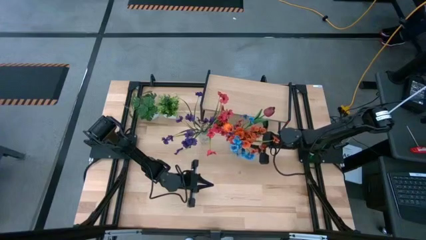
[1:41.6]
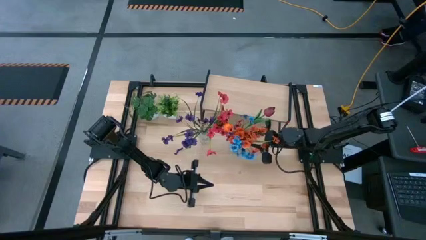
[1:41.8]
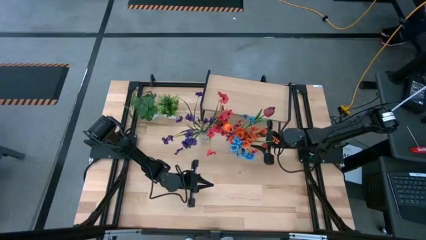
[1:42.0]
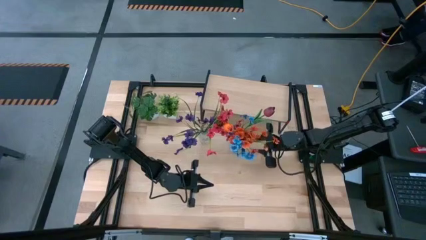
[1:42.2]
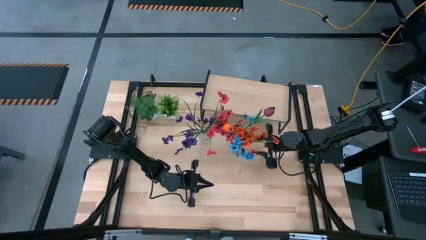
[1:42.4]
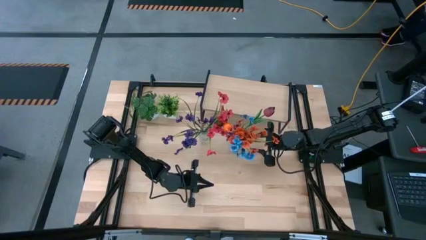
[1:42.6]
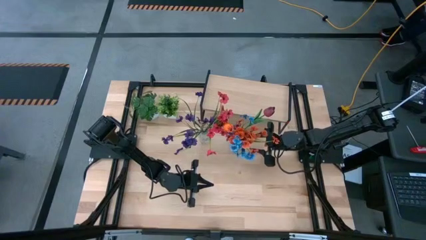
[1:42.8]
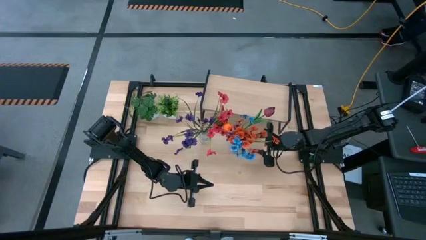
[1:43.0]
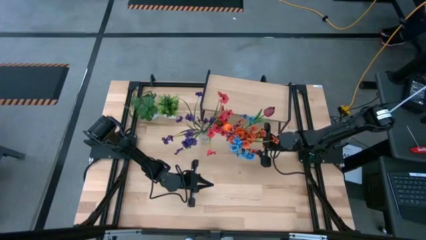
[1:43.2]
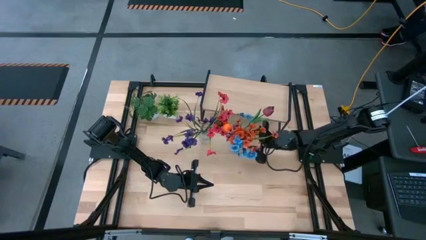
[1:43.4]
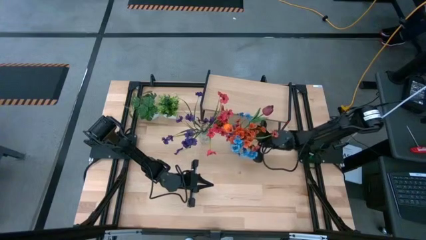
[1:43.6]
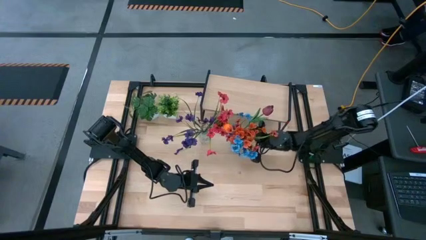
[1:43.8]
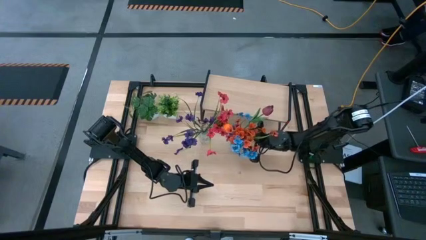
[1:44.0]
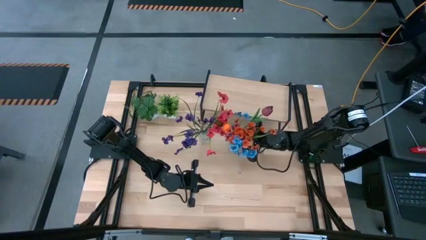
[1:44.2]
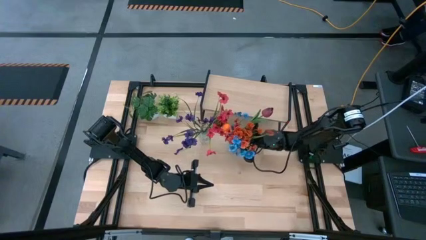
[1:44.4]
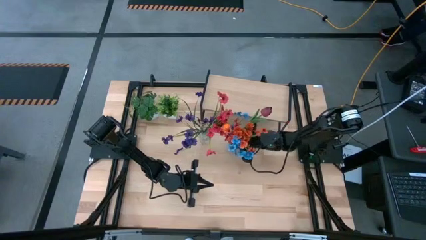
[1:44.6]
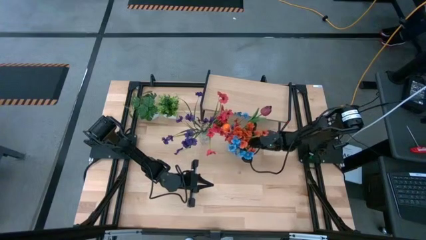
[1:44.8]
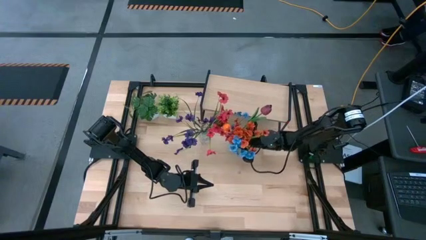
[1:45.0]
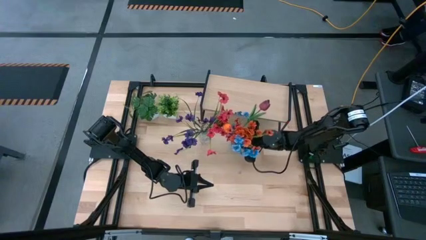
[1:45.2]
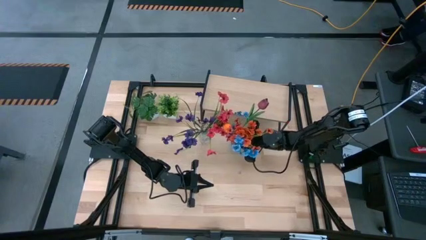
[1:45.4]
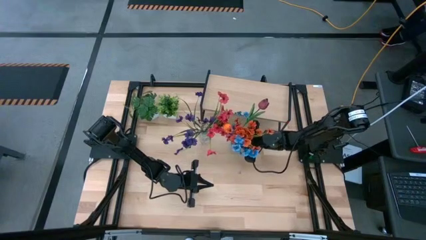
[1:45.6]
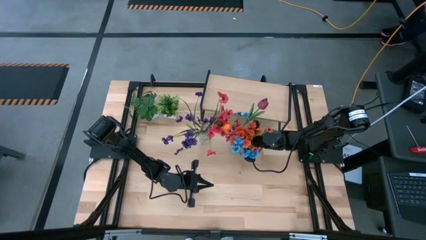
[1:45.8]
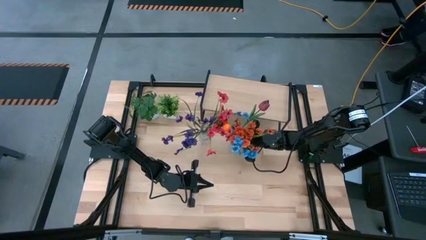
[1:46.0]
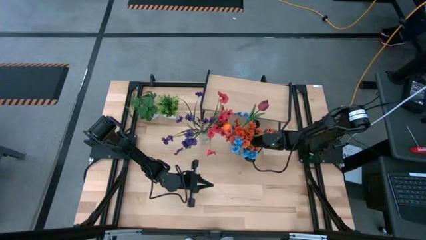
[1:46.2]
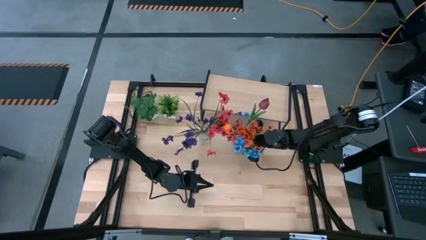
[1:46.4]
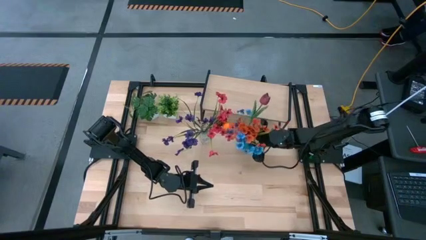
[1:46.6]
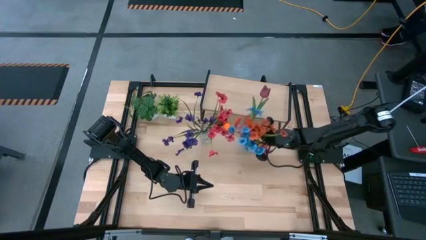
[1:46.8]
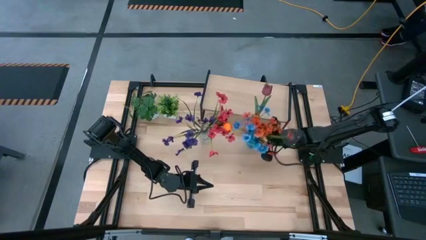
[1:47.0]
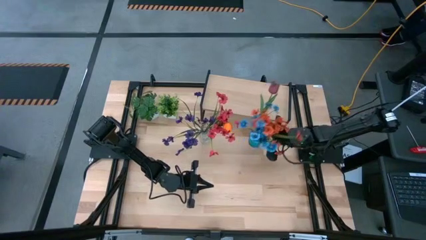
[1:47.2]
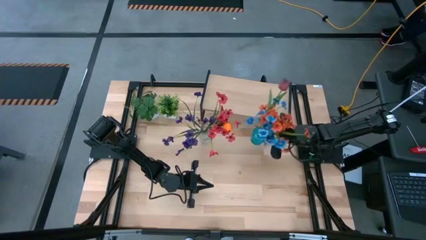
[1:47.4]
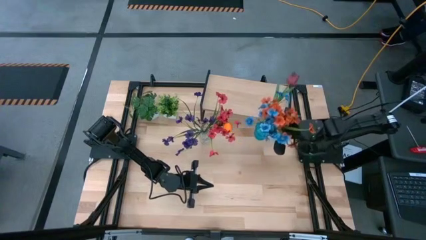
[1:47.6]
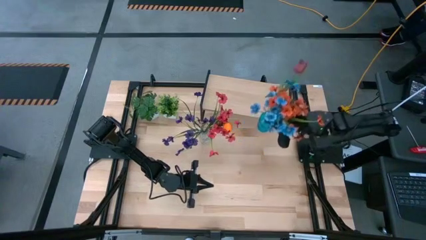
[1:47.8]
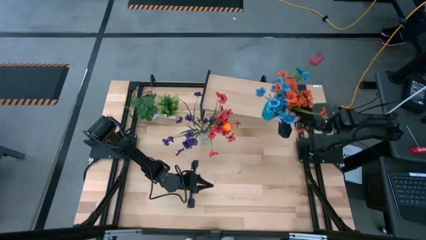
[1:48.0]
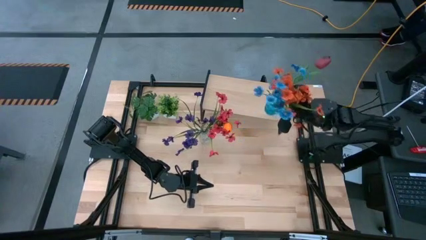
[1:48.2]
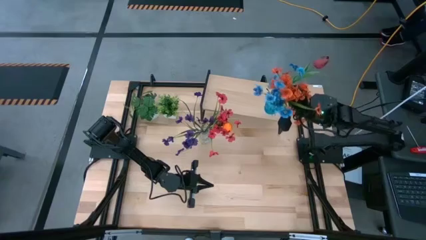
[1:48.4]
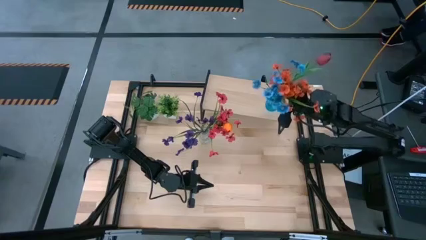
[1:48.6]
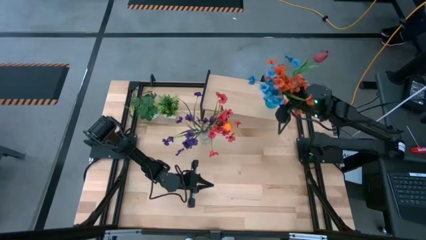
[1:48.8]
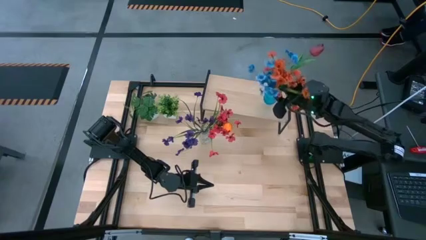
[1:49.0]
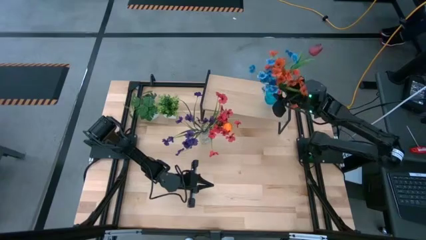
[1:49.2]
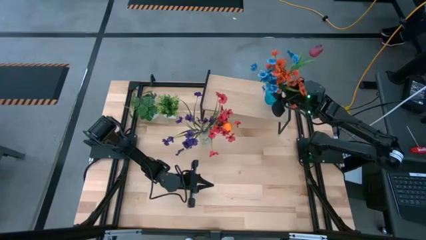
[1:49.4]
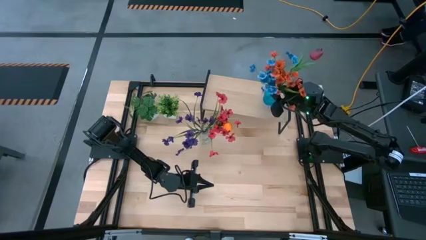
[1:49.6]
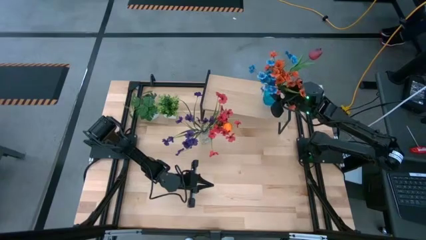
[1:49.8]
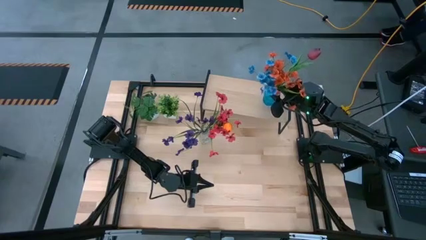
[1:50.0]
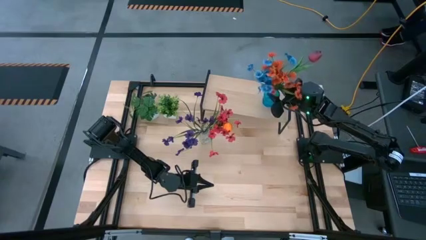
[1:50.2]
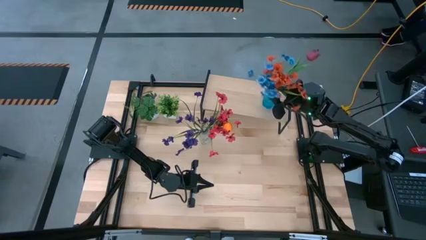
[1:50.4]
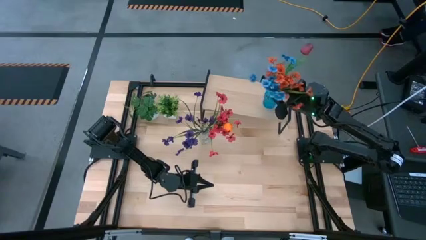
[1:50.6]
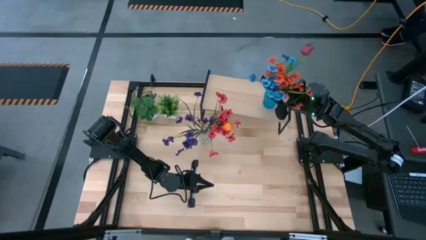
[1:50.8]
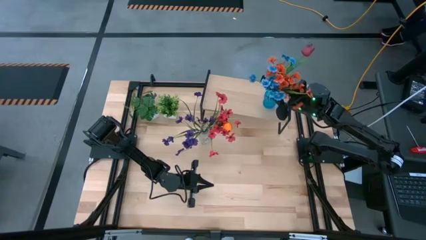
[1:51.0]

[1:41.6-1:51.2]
Task: Pick and place flowers into a vace then onto a shelf
Put the blue vase with the flowers on the shelf

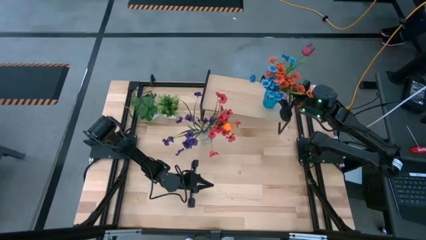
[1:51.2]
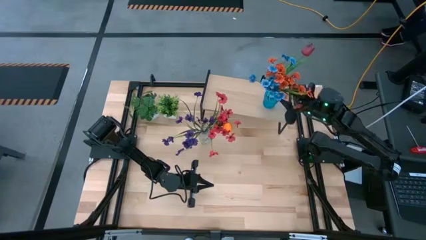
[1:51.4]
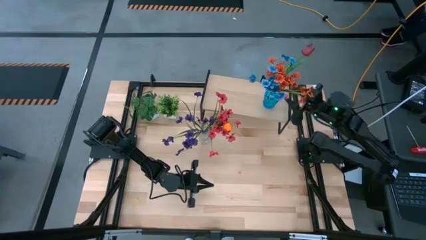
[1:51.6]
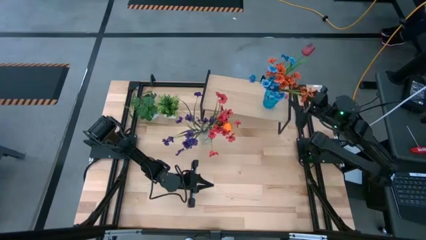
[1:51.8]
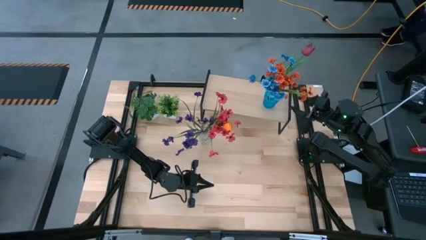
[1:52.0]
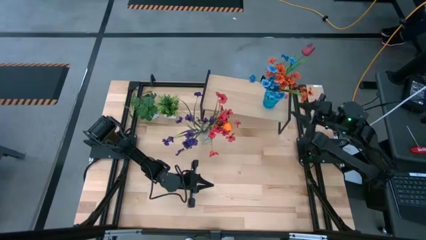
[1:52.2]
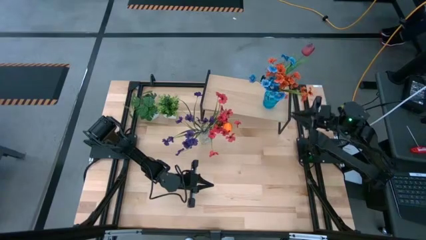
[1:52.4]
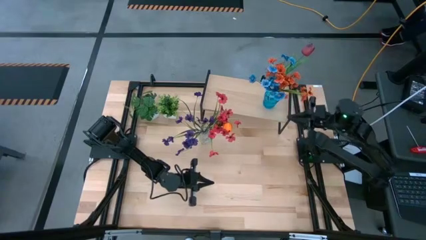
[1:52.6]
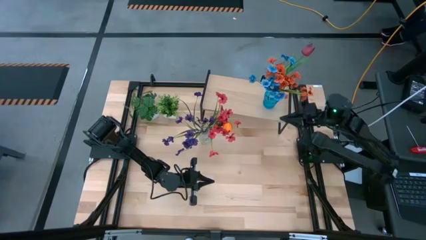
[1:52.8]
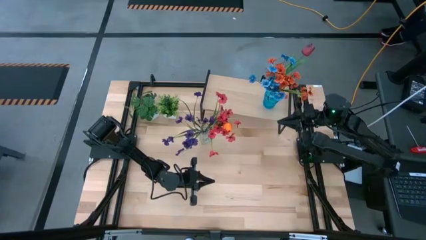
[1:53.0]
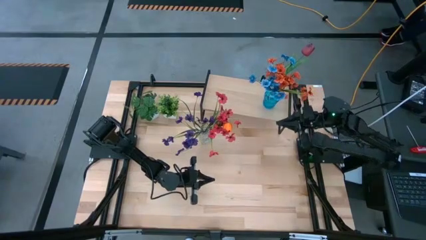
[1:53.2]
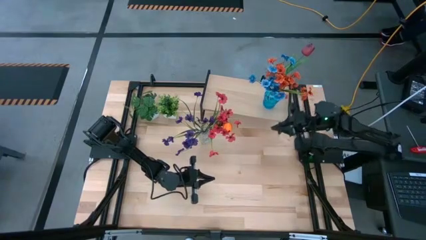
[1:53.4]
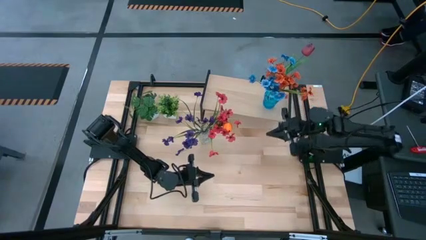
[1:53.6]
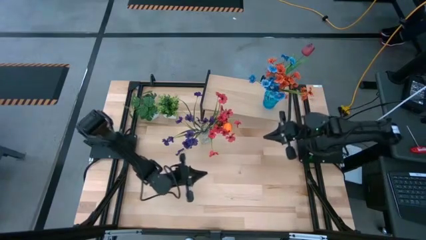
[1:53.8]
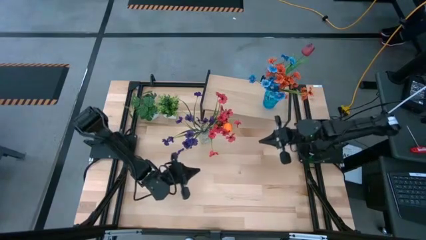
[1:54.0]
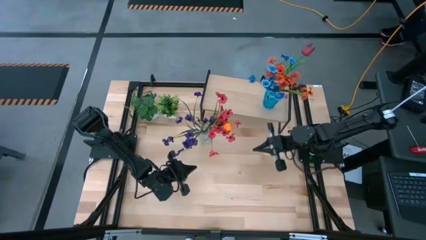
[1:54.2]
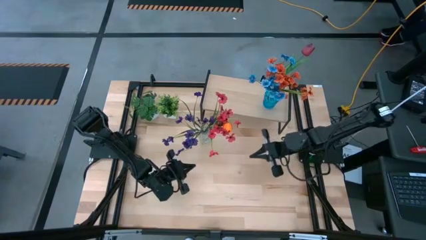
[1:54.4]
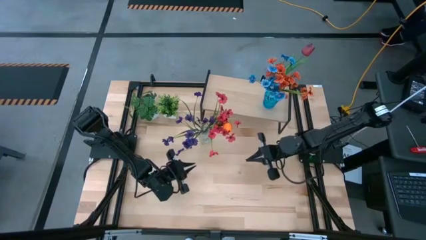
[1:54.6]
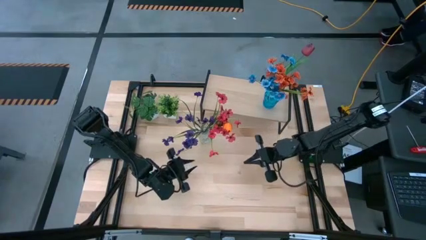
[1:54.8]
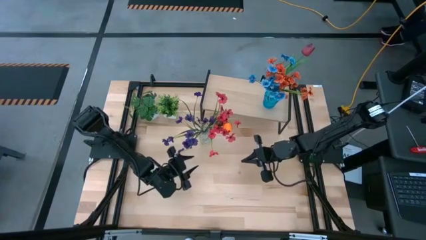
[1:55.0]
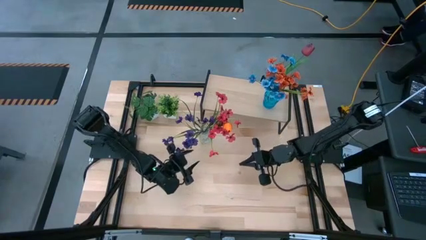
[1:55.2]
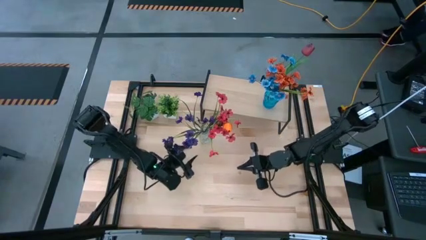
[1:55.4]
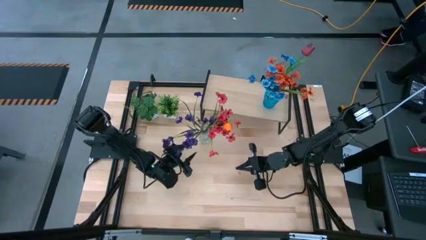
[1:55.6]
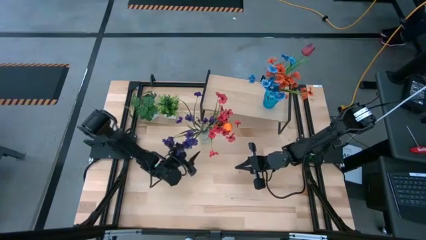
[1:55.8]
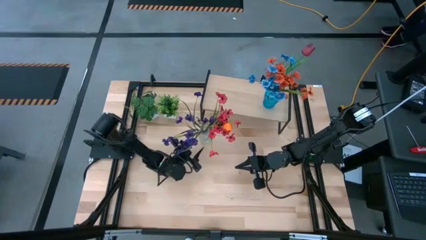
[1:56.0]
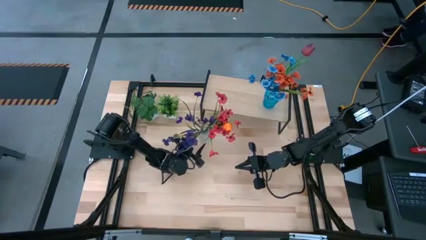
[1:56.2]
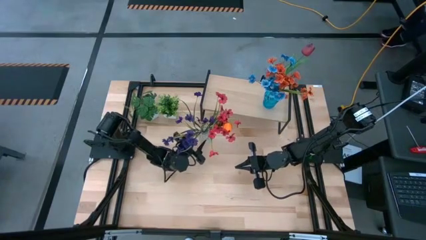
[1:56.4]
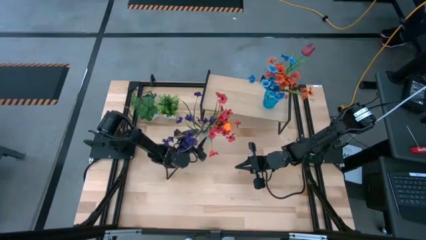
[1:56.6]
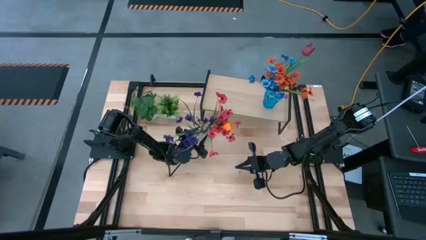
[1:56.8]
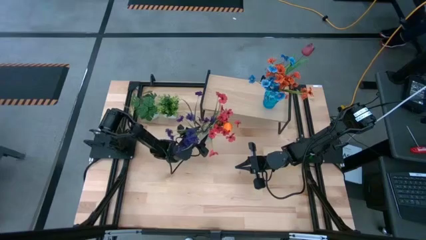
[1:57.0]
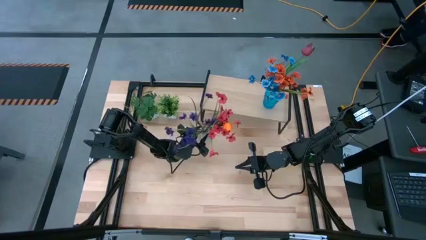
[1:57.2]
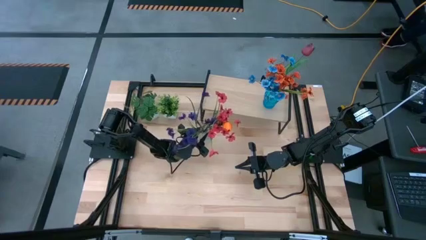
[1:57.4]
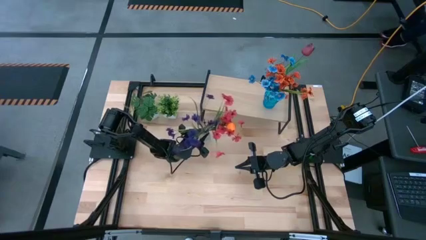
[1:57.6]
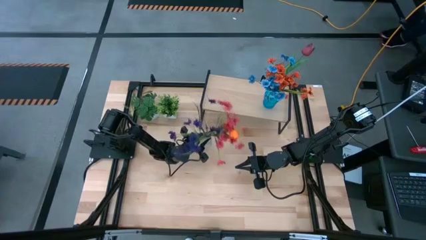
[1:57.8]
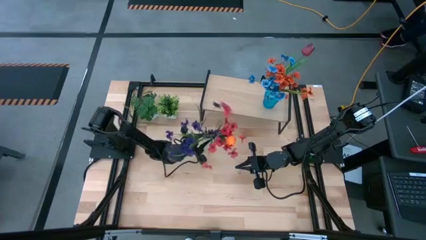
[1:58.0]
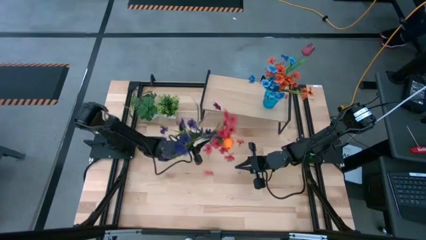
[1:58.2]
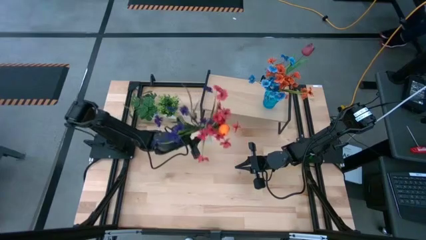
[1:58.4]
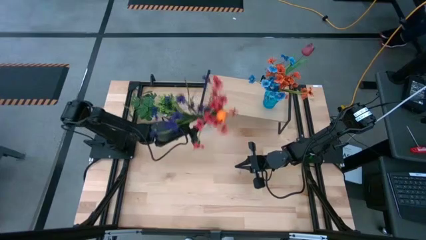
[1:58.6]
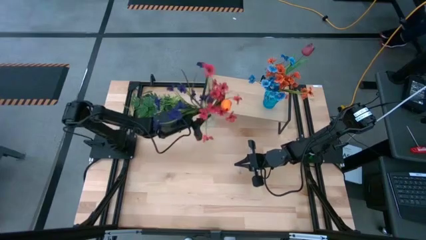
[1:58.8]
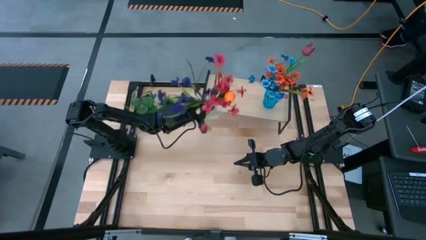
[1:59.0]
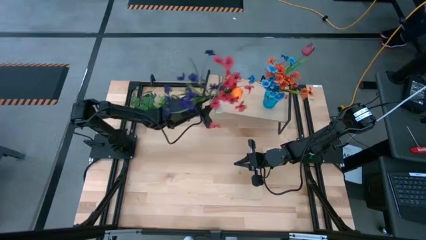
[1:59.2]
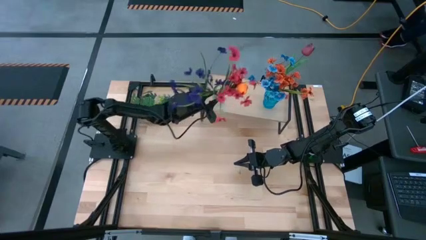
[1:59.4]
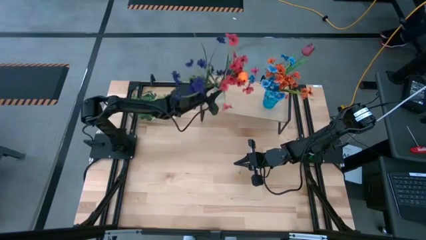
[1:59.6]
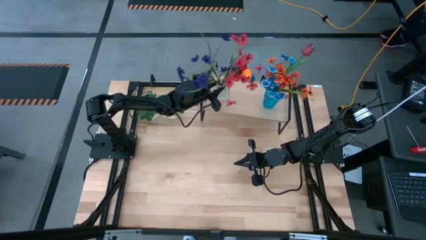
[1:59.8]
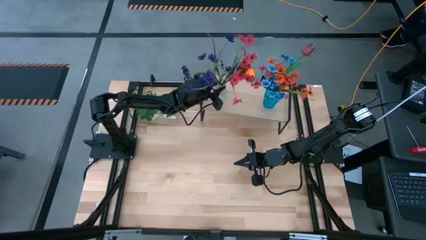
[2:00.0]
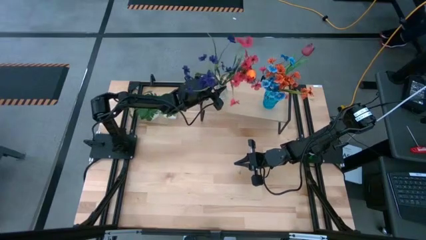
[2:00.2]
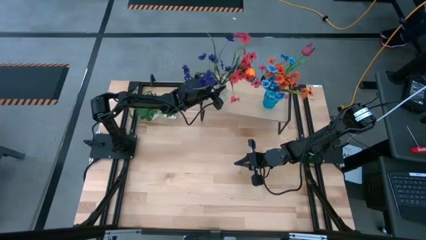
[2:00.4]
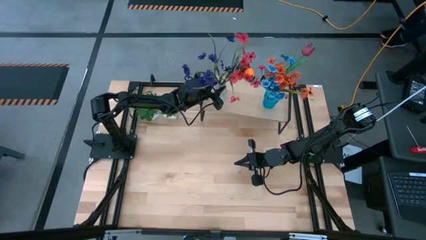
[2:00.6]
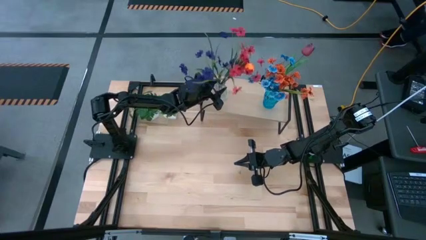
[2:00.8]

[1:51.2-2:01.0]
Put the transparent vase with the flowers on the shelf
